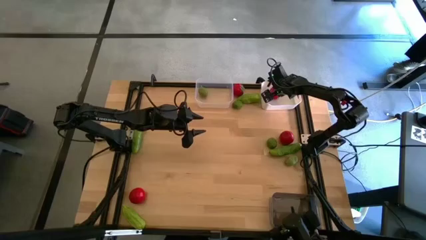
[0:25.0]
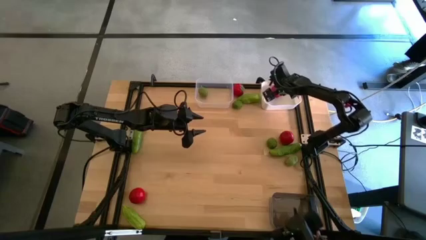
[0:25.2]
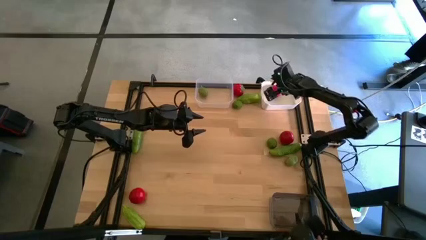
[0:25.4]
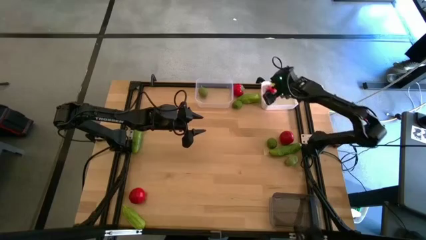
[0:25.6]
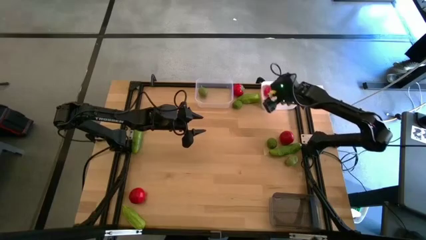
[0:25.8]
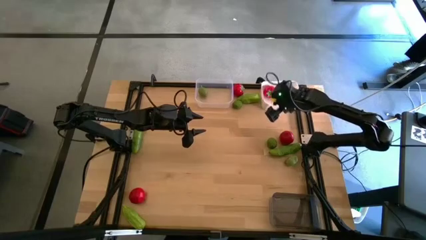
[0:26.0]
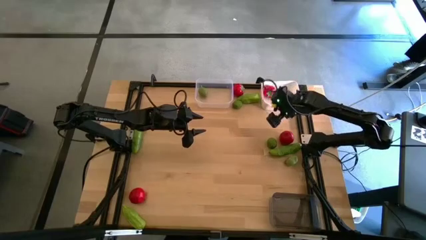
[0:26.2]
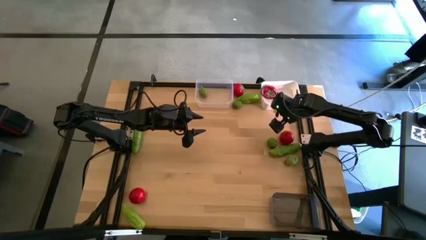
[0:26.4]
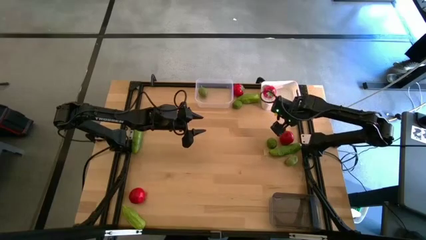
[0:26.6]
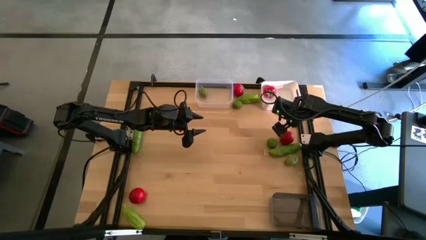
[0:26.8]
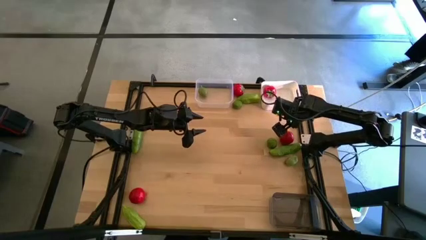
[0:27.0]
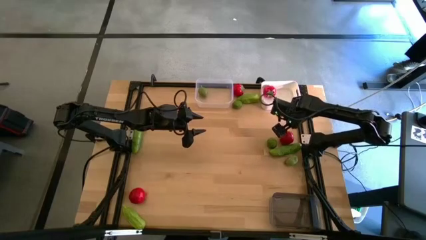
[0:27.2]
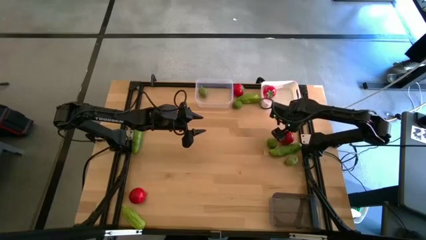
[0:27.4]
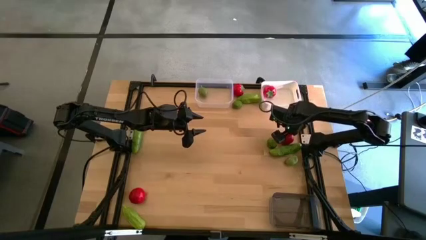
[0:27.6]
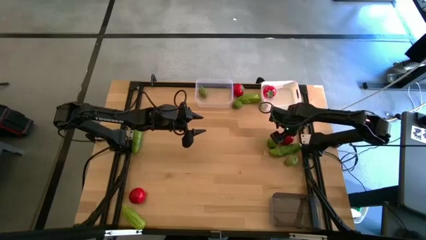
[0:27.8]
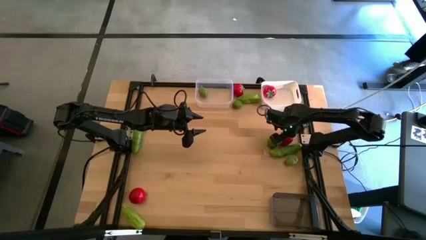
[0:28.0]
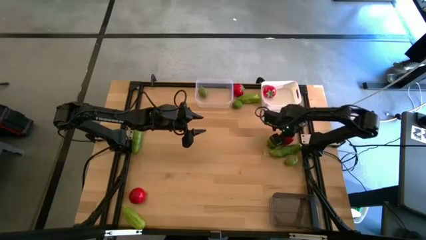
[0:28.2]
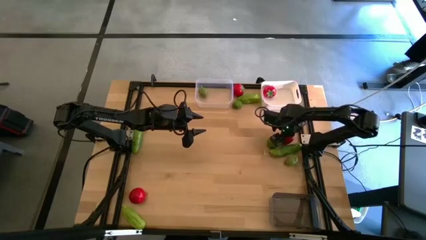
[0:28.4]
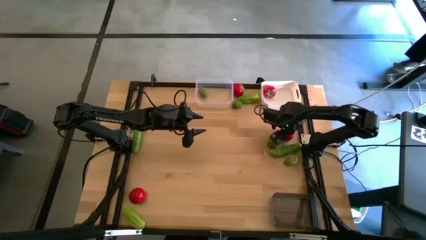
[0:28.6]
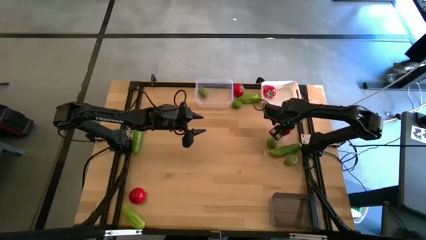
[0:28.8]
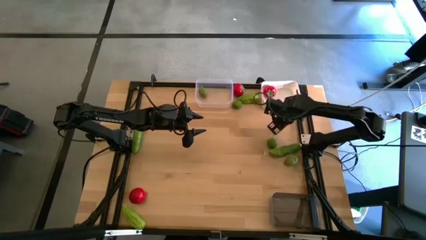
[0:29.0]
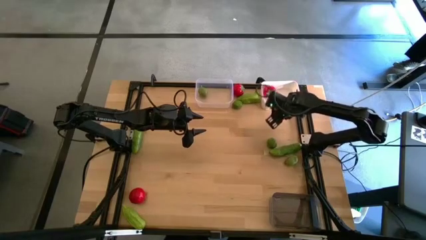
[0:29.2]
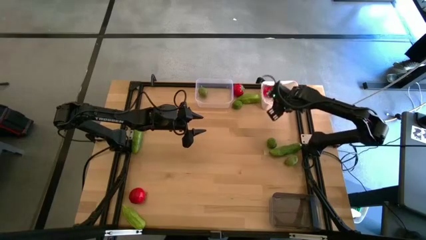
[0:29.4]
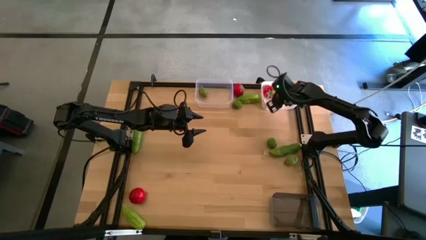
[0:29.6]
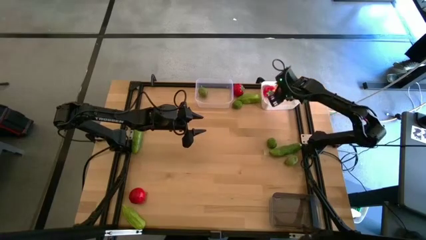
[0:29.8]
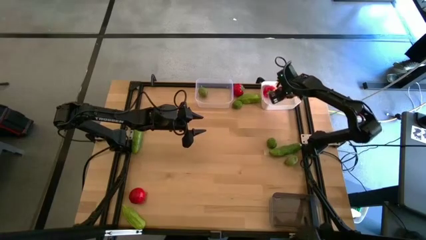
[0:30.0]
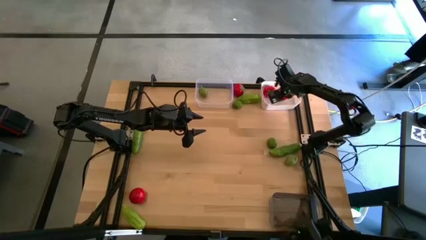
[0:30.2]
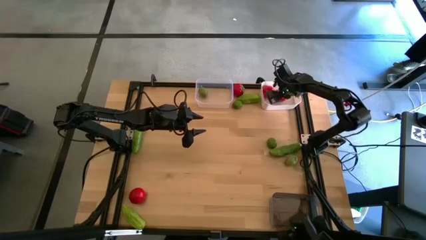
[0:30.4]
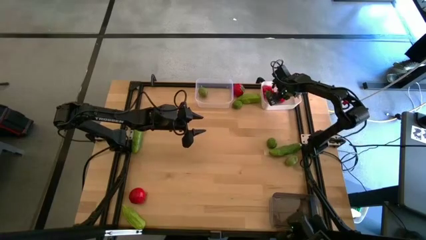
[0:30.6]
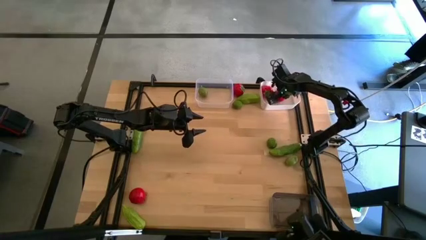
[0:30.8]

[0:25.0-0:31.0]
Task: Sort produce into baskets
Put the red tomato into the white bin

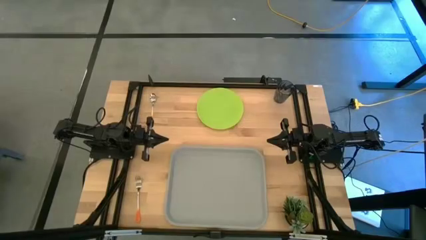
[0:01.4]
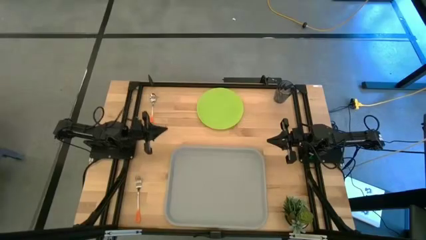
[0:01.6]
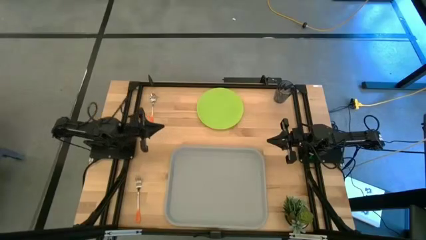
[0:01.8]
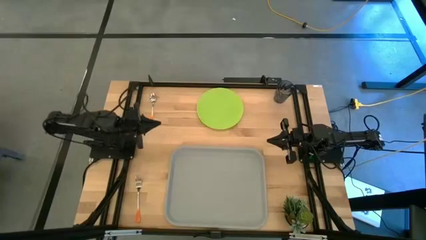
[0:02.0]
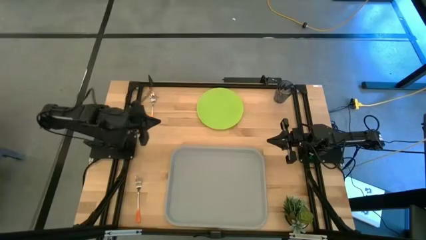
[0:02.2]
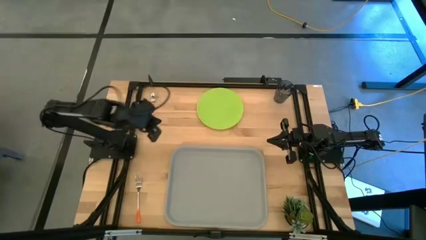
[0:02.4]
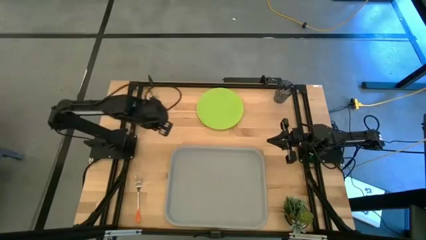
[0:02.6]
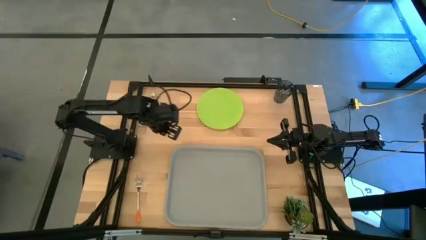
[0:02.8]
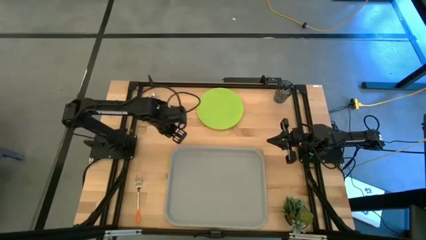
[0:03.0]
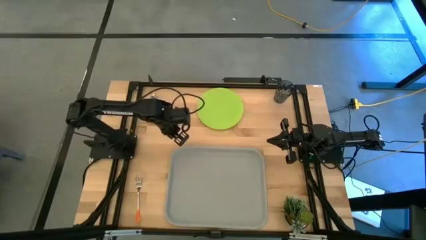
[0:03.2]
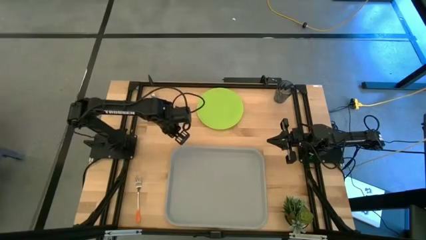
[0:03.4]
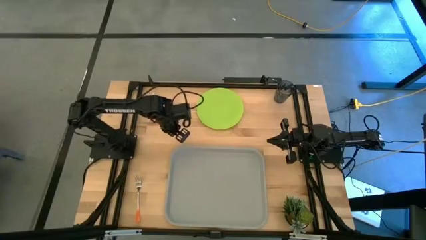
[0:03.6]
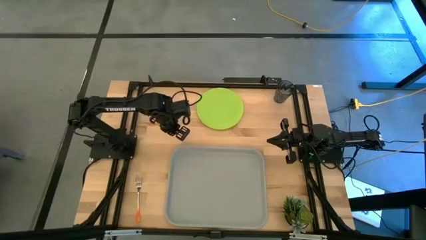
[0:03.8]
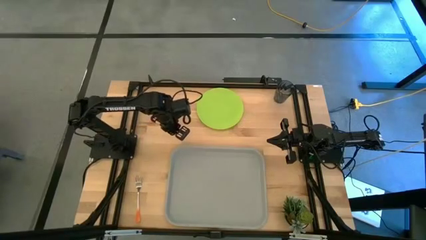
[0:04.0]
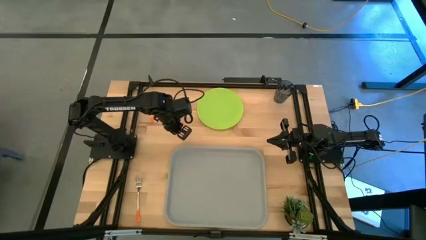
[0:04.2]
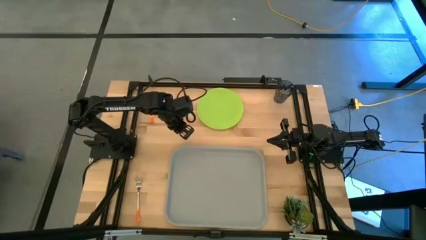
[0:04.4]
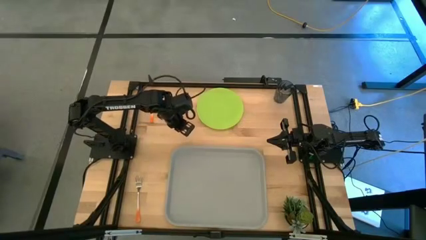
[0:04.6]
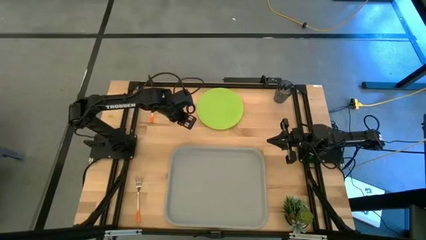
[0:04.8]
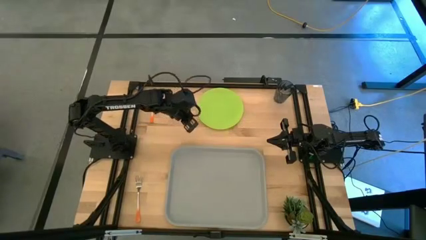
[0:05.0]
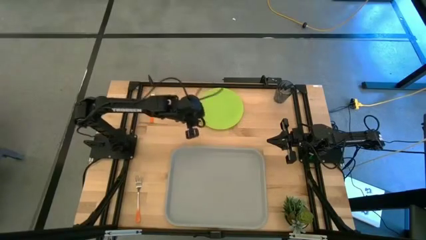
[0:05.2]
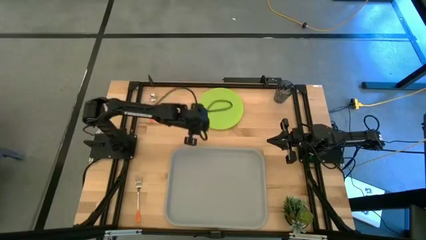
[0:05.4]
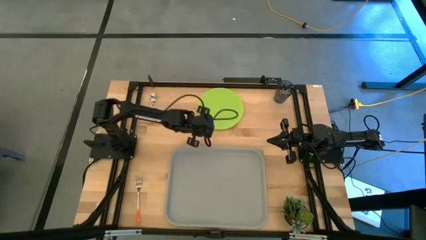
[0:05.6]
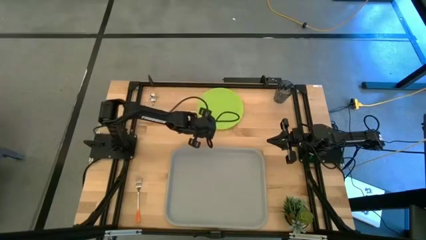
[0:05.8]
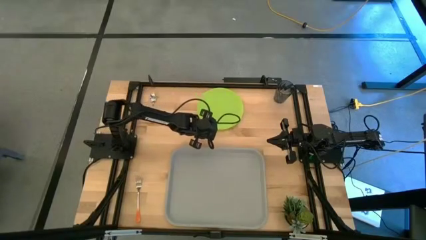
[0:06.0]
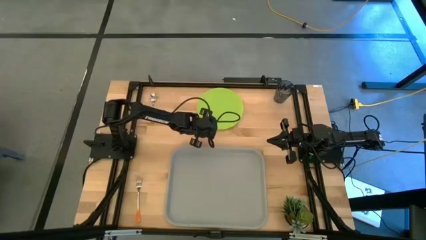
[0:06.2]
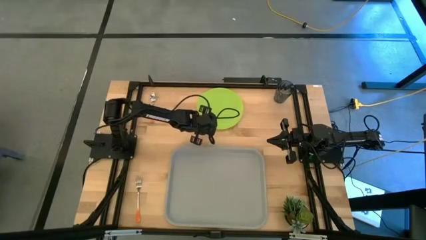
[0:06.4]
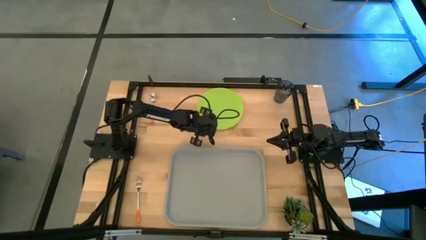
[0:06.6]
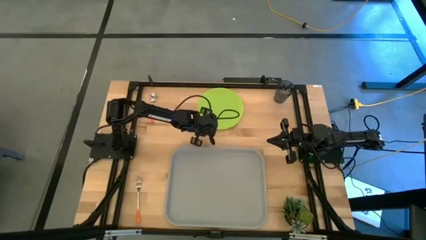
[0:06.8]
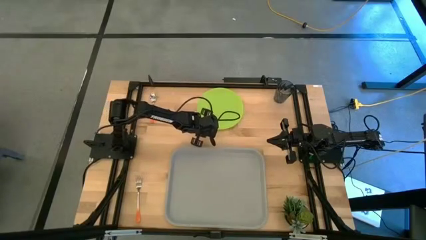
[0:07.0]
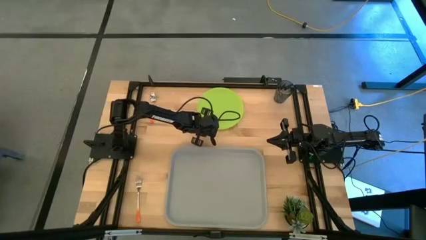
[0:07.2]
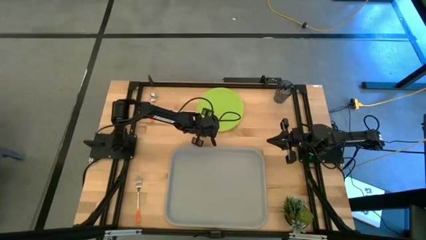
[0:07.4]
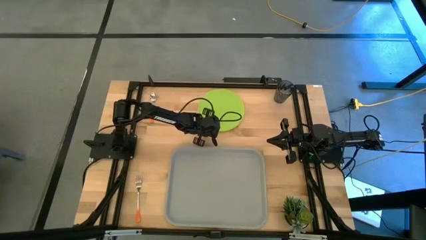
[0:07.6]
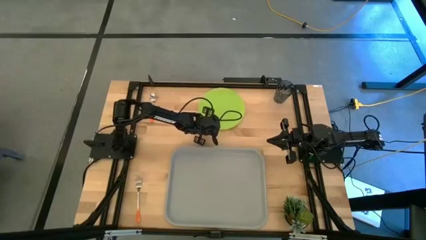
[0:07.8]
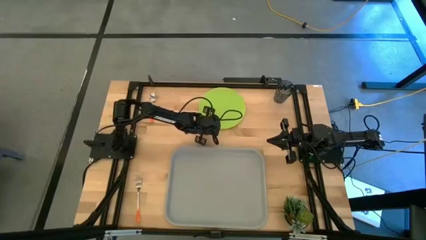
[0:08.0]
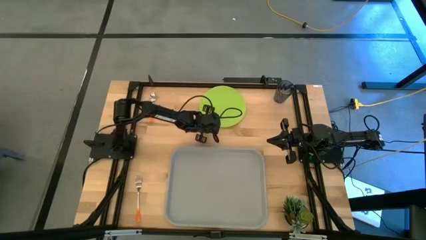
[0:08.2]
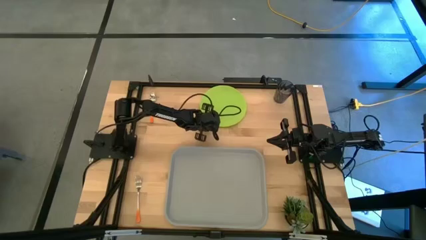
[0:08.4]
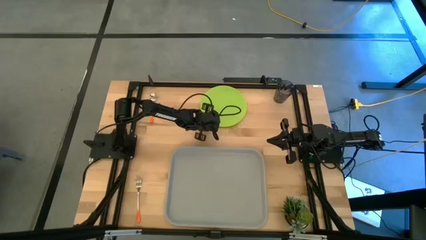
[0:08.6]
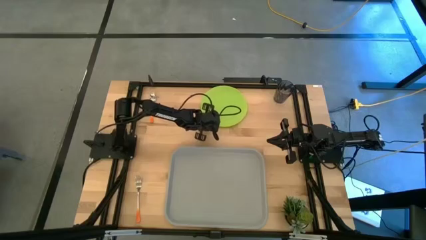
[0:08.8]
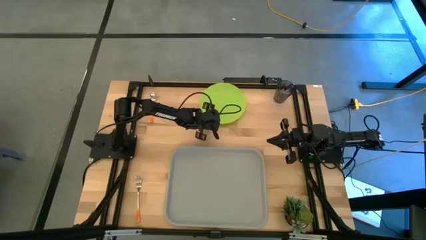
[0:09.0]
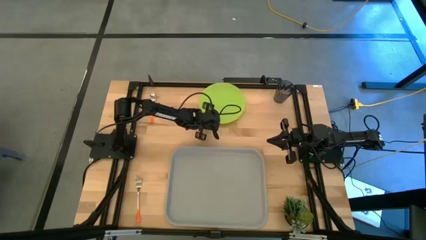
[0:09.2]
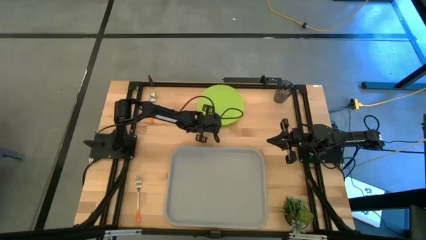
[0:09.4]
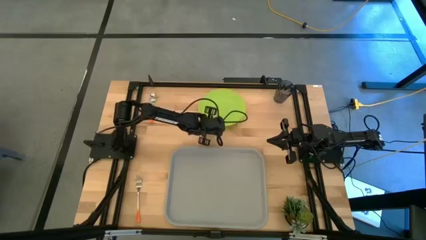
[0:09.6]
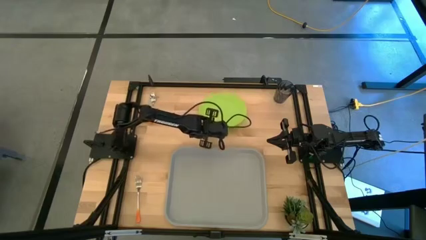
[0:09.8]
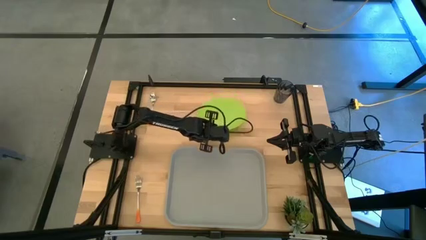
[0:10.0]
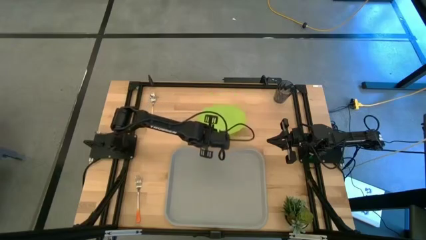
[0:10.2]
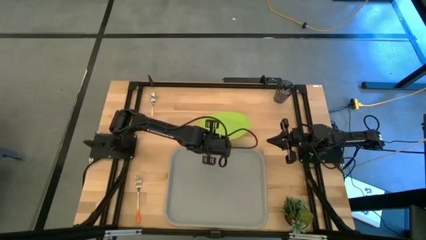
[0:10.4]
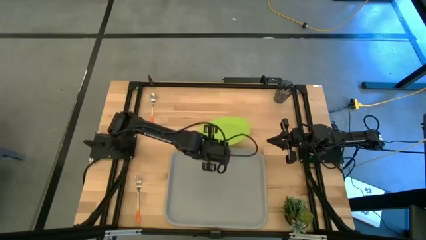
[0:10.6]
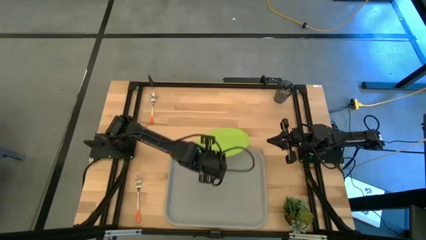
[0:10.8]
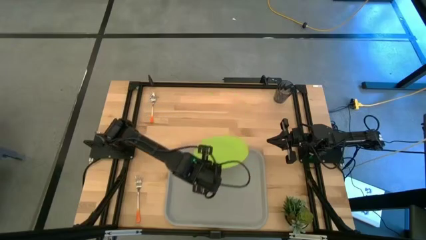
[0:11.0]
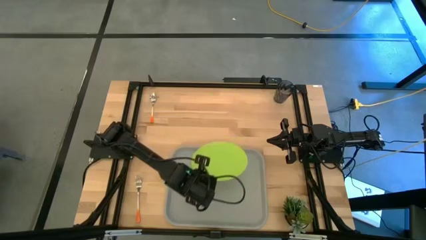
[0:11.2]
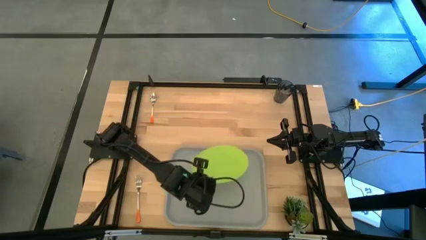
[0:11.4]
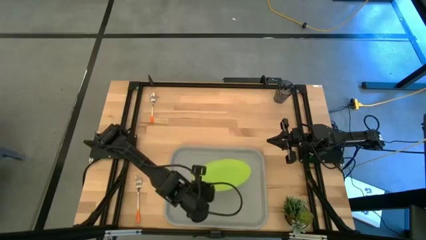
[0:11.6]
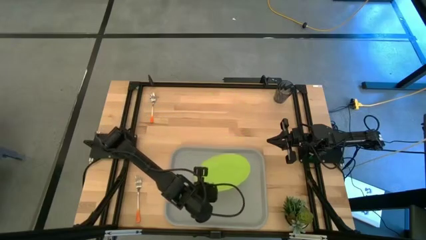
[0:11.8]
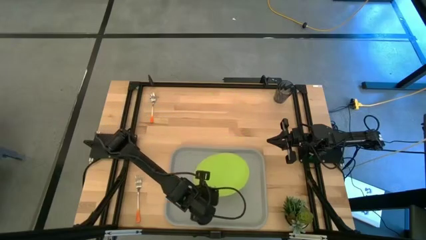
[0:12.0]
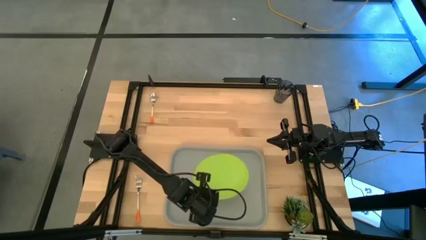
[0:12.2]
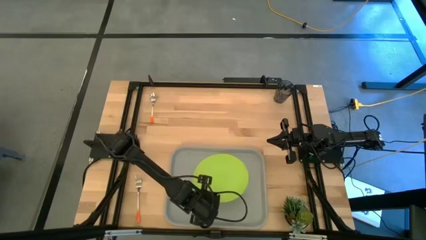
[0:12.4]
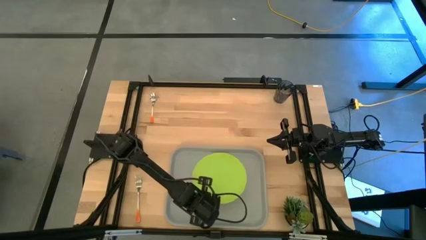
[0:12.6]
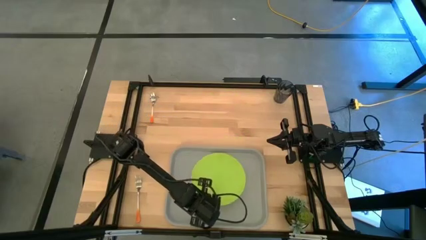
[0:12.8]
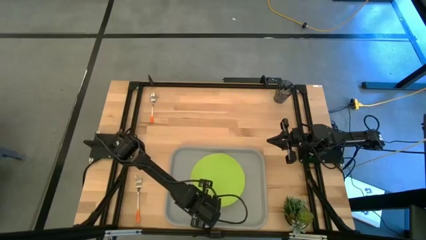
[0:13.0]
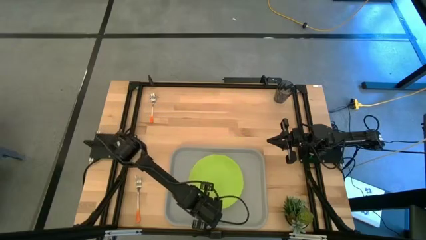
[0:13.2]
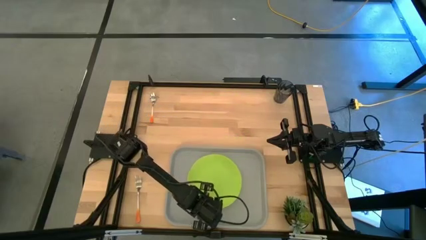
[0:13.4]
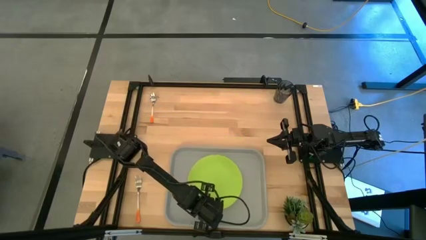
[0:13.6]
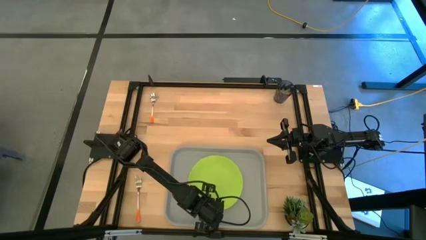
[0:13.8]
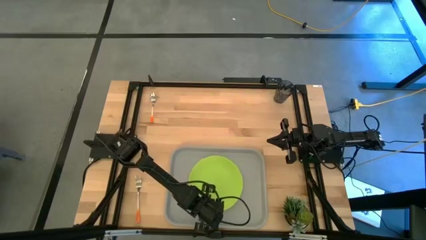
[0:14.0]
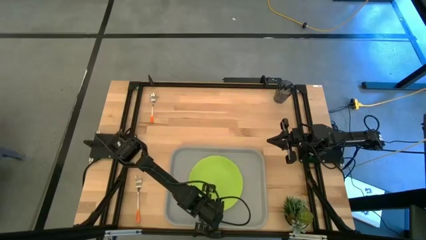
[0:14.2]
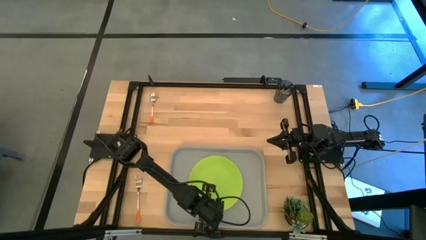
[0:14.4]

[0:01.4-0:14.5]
Task: Pick and place plate/cup/fork/spoon on tray
Put the green plate on the gray serving tray
